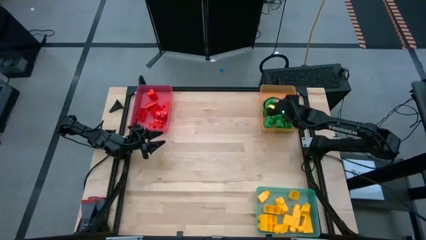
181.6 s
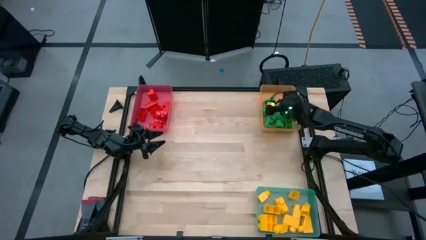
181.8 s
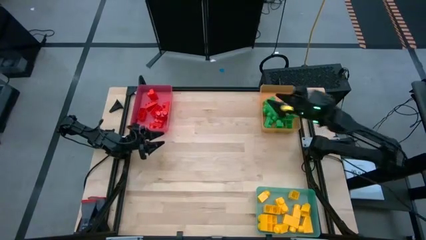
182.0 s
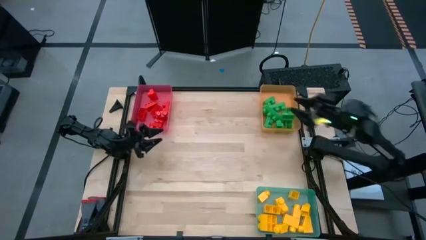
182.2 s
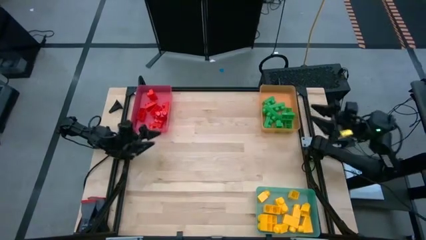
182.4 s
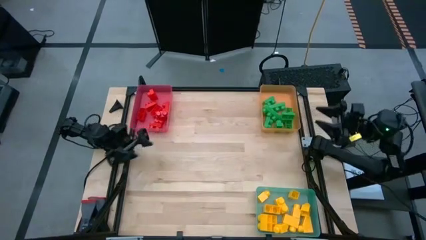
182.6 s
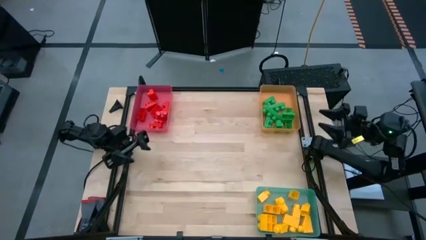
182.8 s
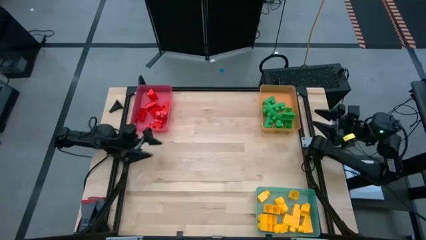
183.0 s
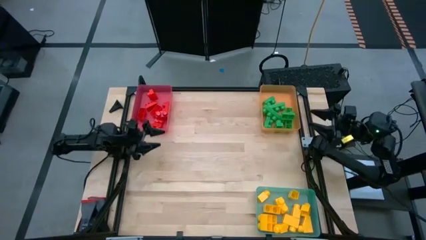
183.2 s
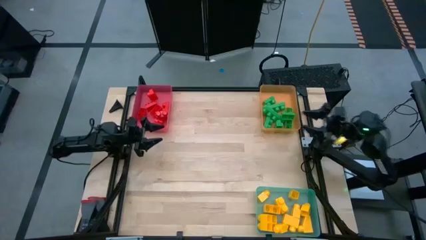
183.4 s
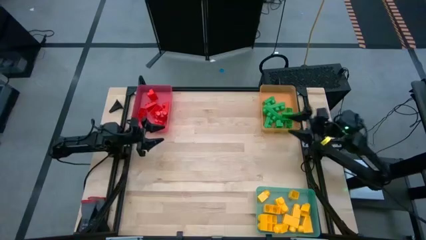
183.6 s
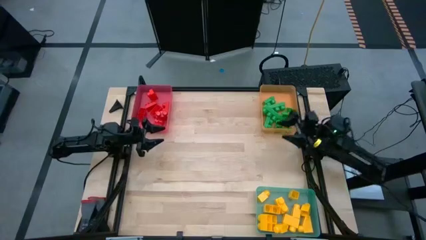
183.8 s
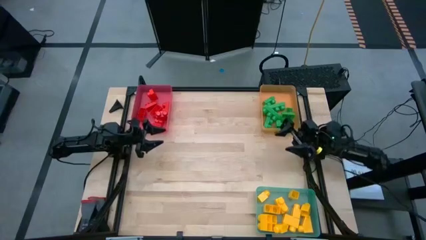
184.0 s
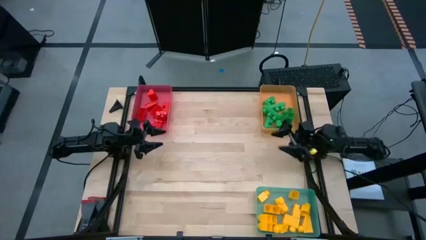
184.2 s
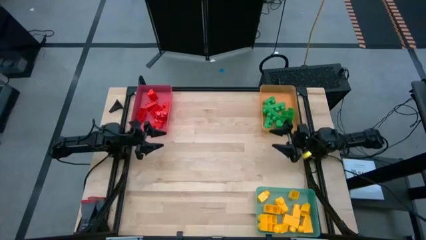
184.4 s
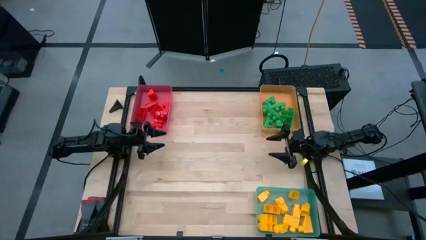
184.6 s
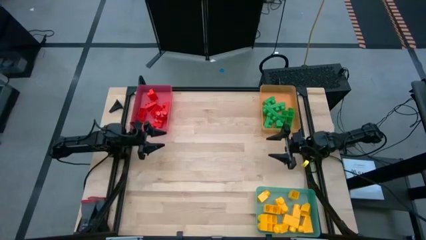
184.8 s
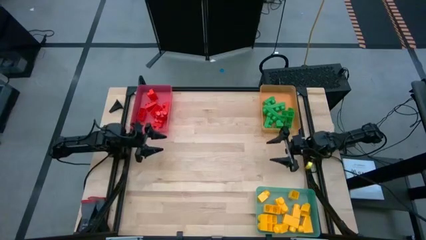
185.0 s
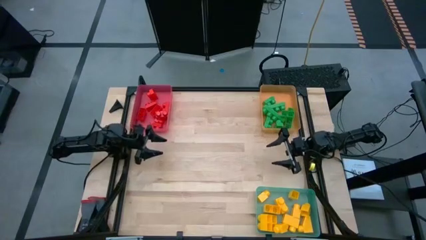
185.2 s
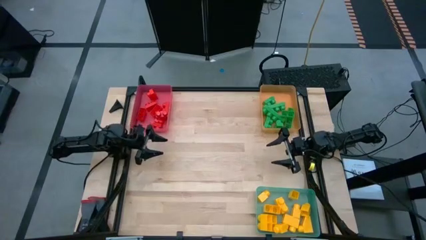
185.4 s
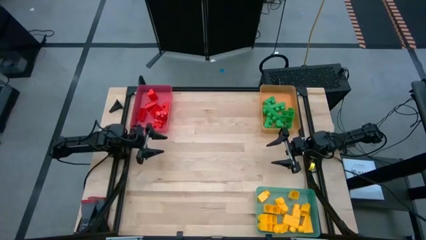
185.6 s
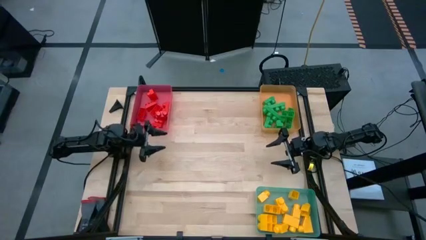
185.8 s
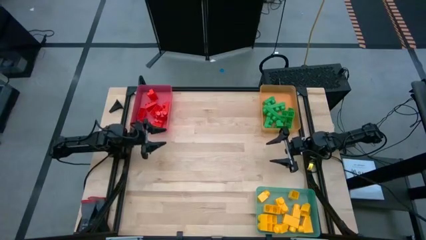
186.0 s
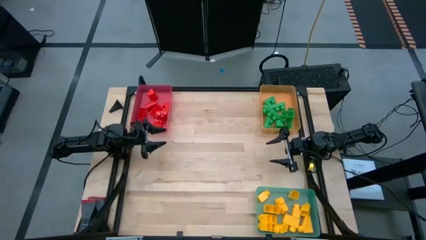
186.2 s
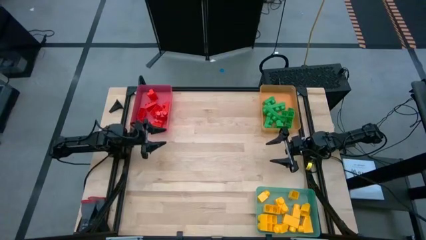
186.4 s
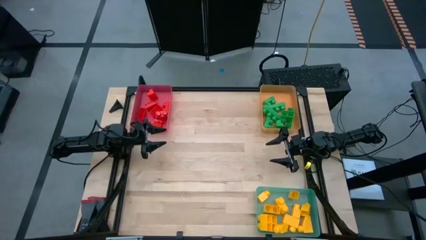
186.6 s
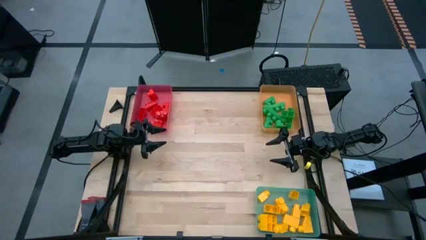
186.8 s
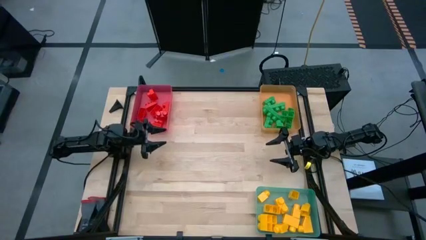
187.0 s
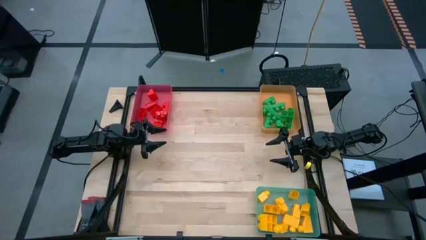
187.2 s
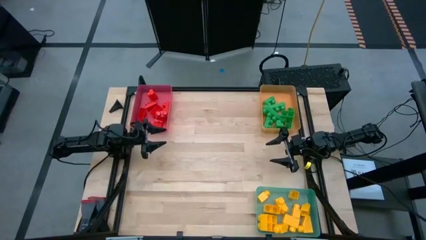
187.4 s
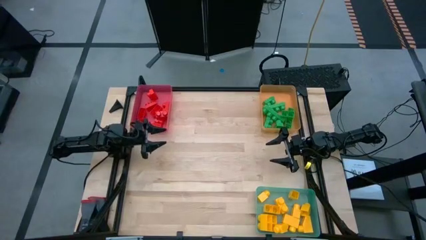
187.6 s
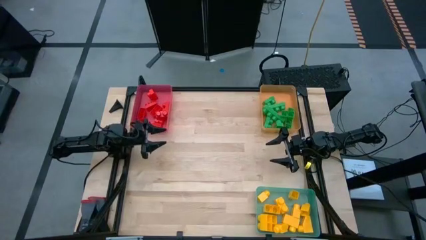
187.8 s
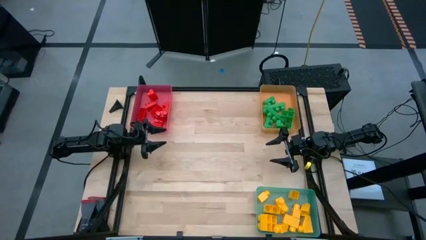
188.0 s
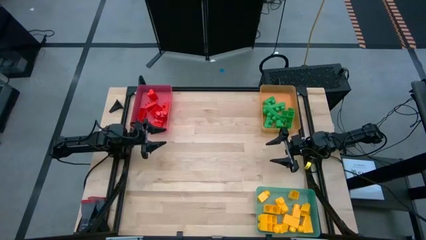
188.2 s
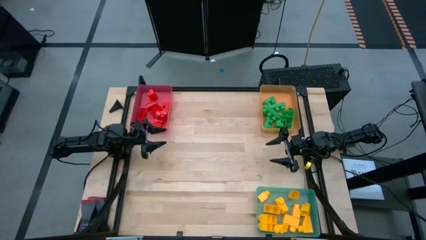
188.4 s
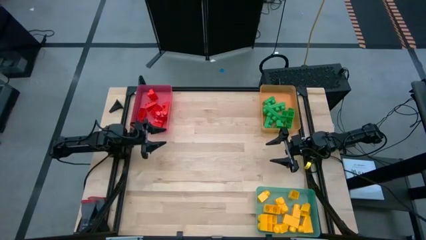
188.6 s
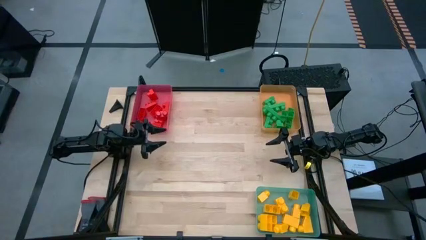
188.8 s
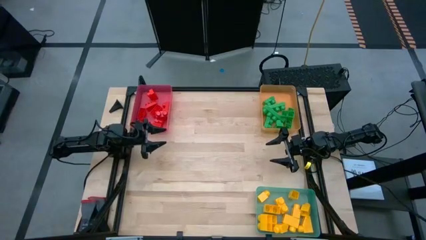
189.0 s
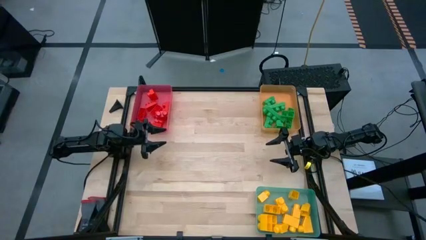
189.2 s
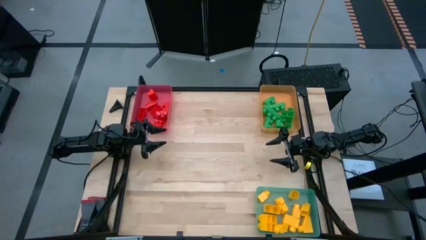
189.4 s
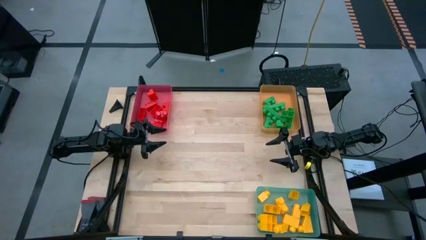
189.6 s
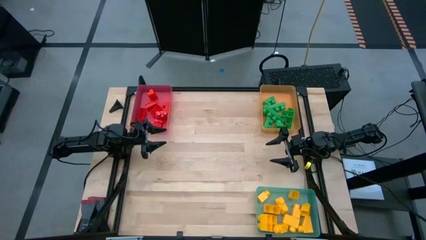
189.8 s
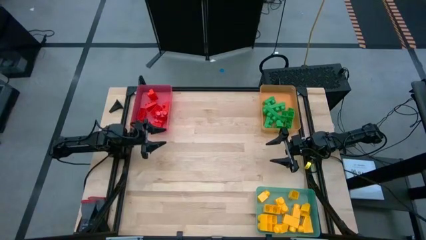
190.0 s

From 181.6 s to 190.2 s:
Task: Sort blocks
Return to Home Position

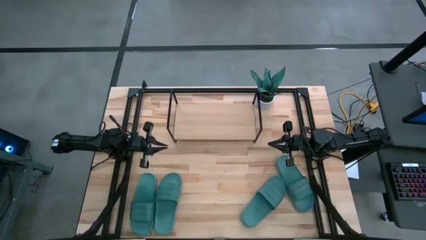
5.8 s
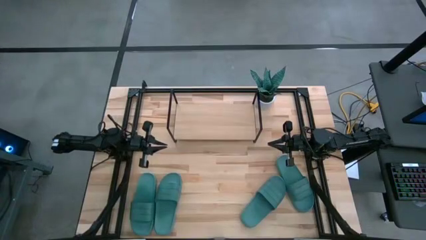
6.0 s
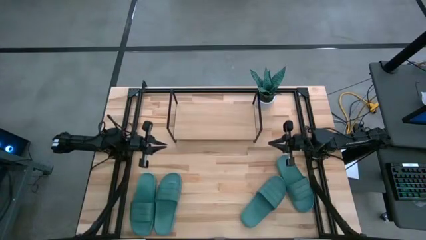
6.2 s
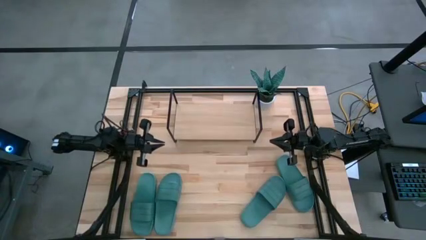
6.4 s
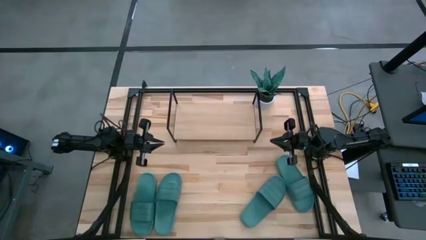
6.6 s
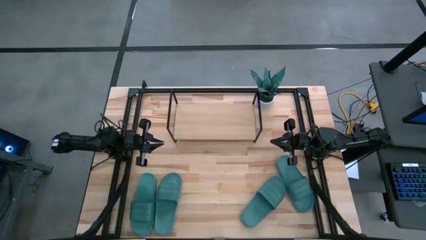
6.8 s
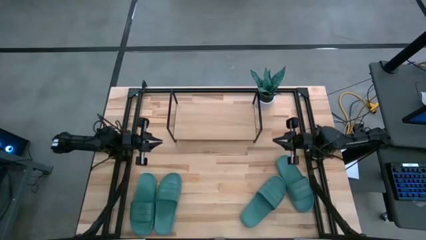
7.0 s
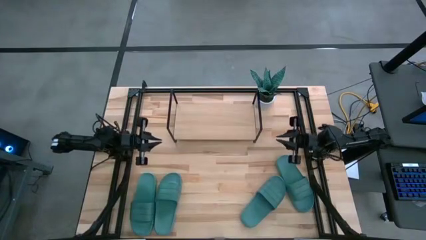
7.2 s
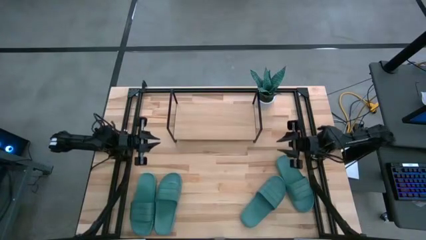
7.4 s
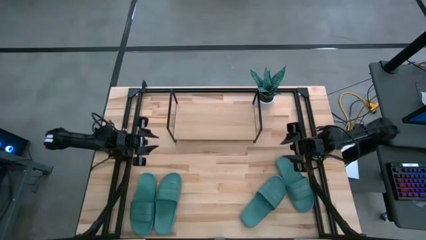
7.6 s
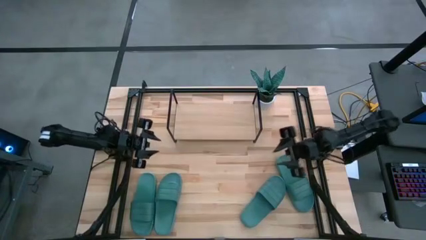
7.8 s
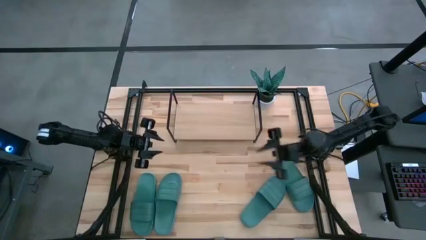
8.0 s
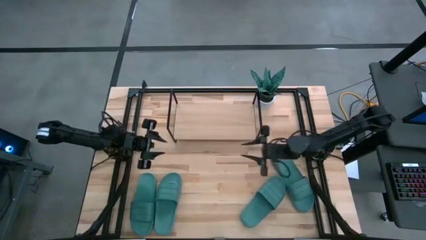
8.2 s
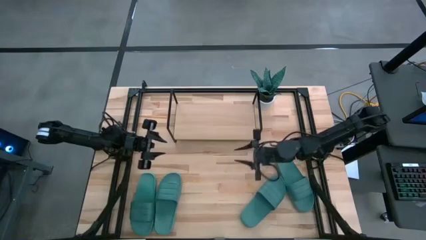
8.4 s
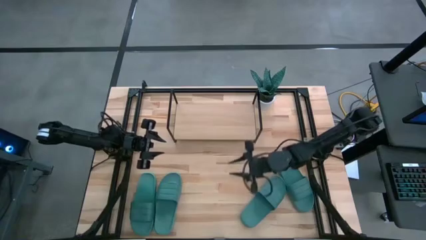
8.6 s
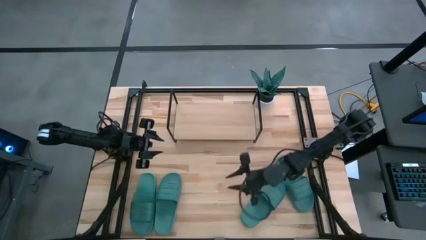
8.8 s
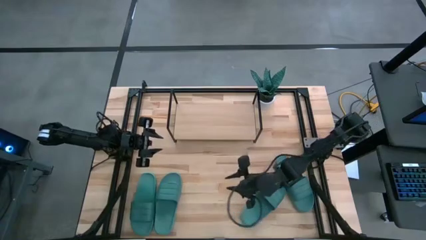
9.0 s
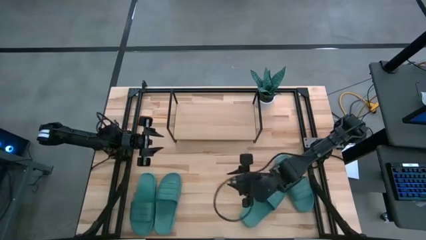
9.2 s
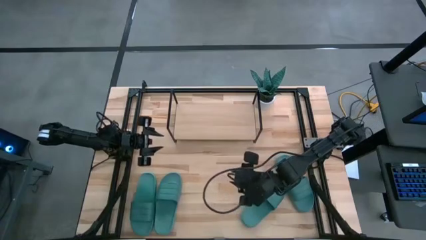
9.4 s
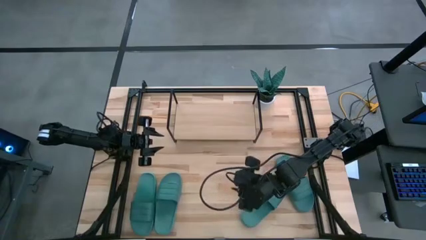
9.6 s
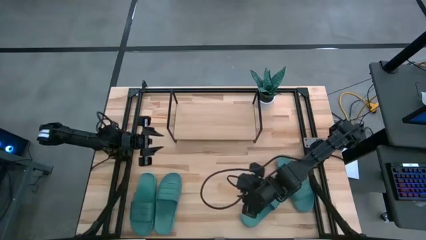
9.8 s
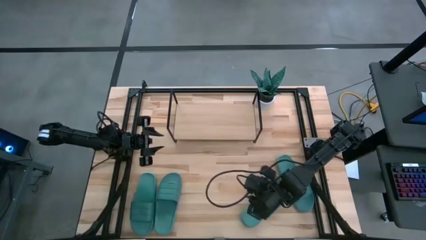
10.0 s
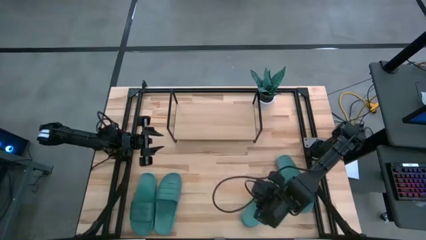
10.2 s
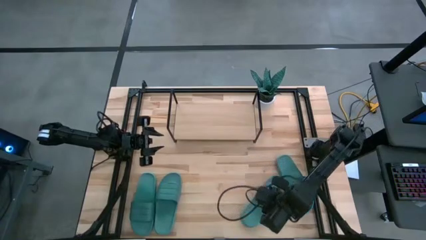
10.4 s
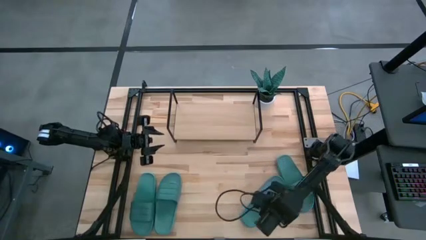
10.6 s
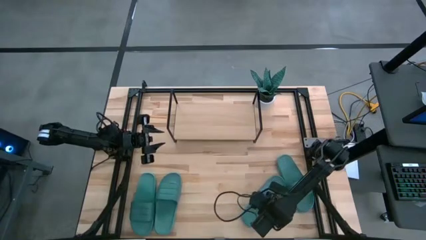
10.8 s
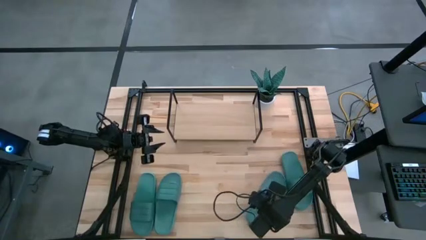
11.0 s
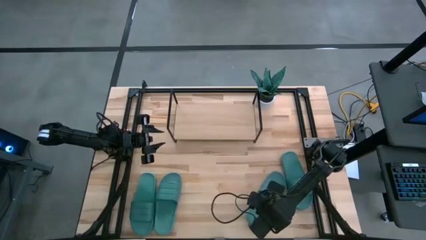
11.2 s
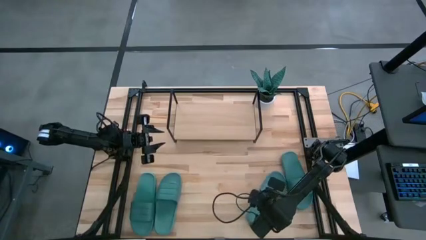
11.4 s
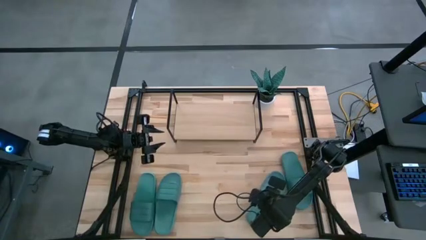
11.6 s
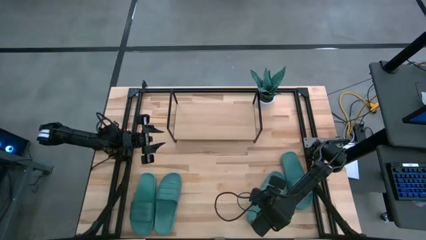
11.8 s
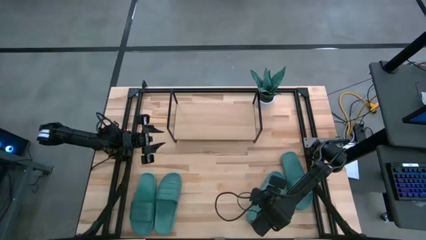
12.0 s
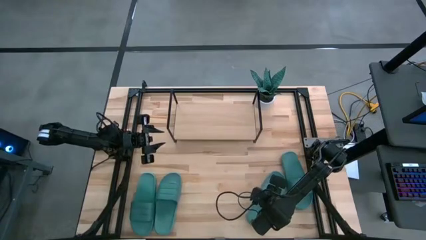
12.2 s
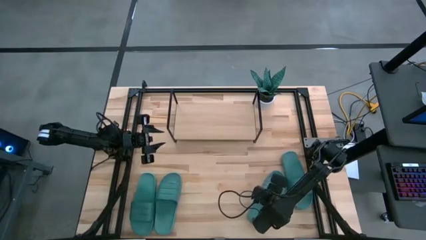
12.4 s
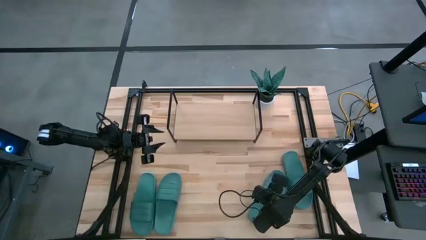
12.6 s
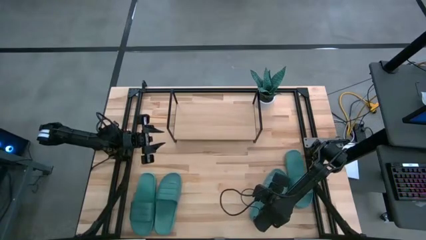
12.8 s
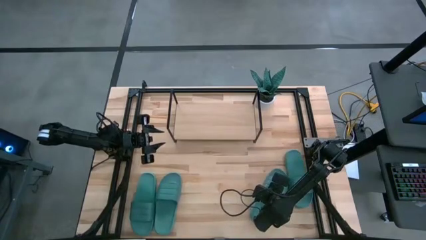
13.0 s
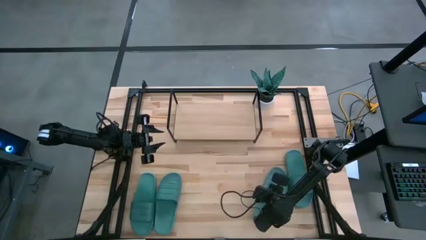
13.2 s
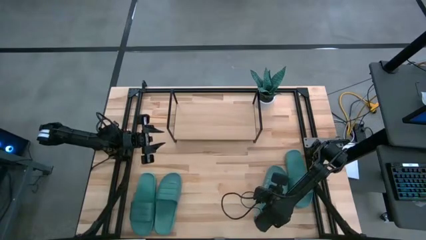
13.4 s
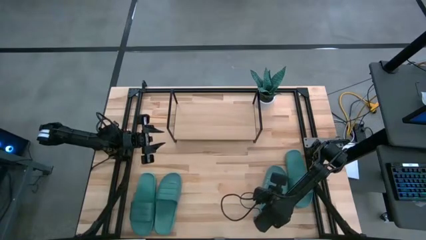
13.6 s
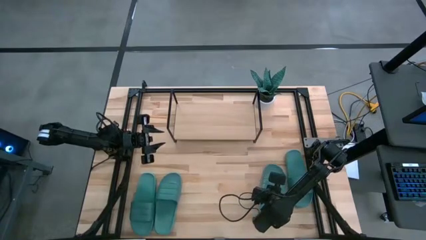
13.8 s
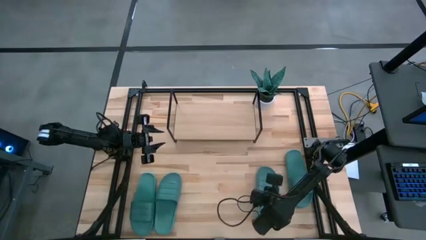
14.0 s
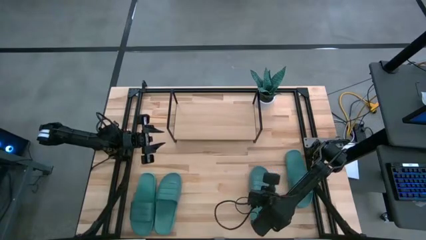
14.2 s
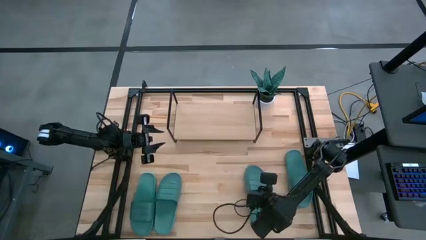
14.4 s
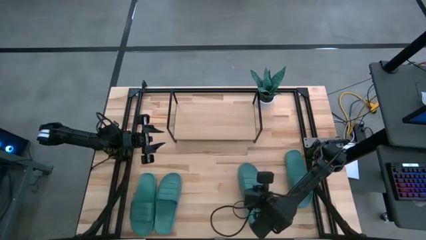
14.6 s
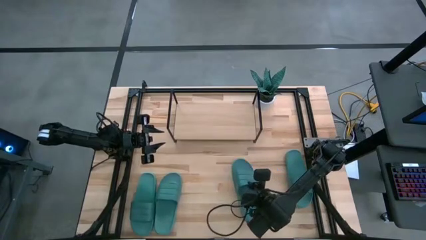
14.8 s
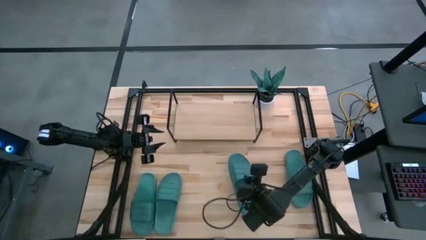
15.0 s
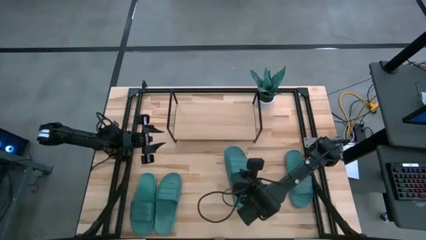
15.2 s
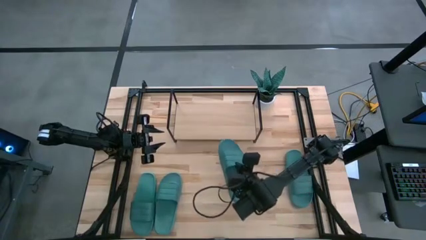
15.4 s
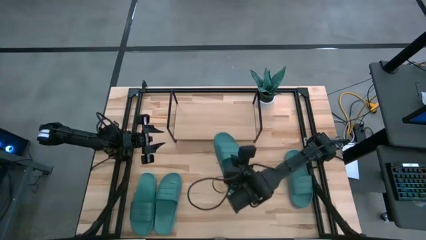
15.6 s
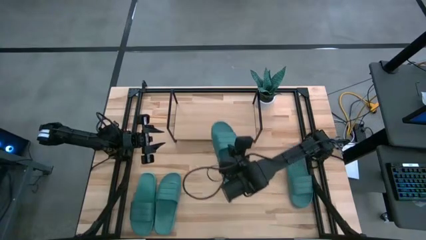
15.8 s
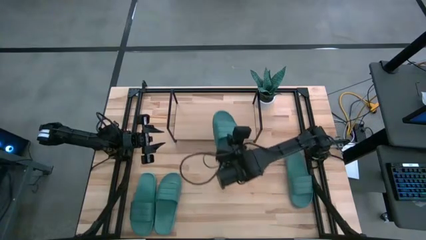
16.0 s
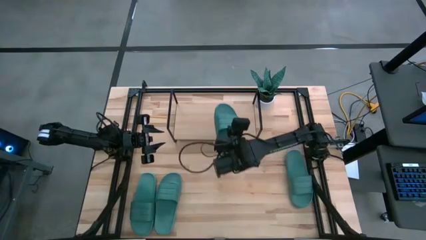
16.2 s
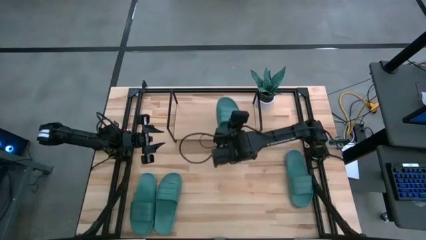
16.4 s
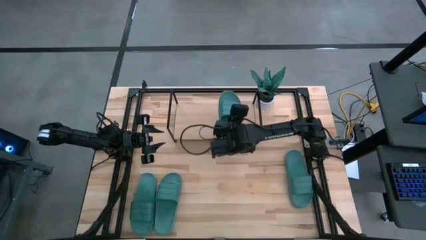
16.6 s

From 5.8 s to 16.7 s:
Task: Pick and place slides into the shelf
Put the green slipper on the shelf
